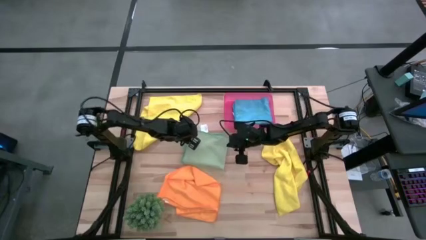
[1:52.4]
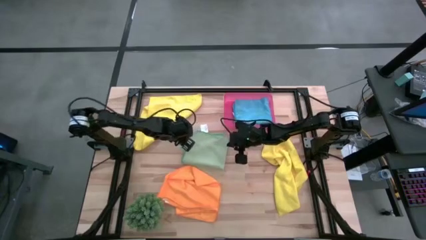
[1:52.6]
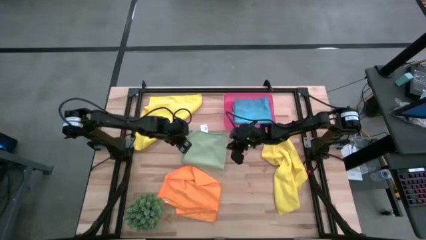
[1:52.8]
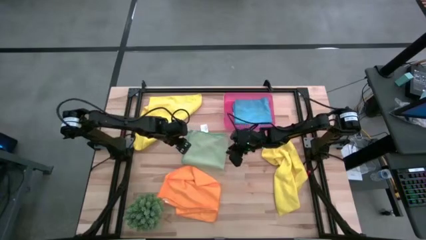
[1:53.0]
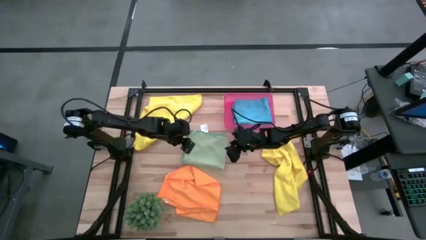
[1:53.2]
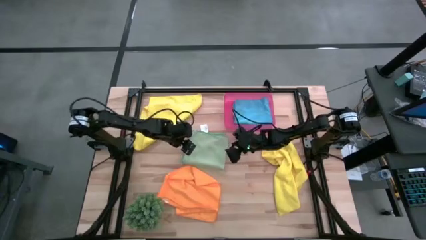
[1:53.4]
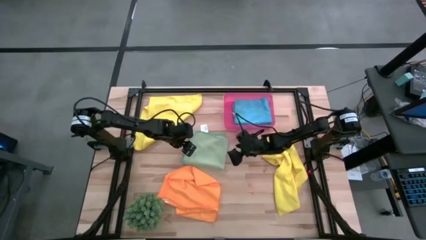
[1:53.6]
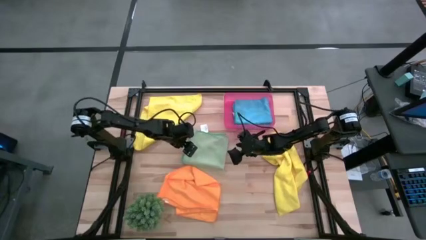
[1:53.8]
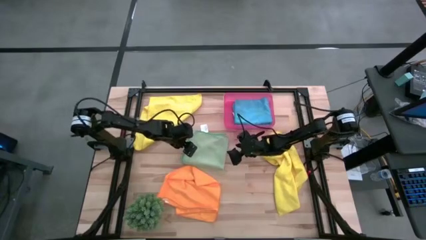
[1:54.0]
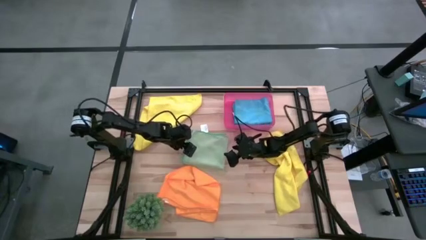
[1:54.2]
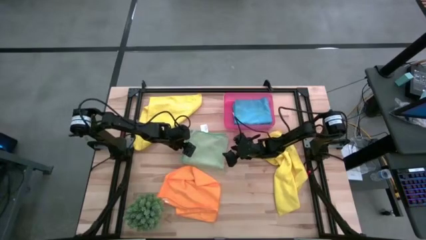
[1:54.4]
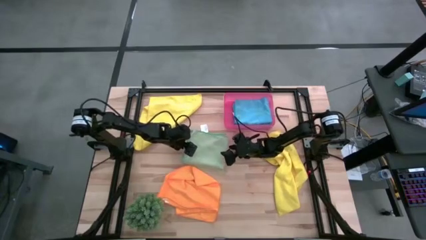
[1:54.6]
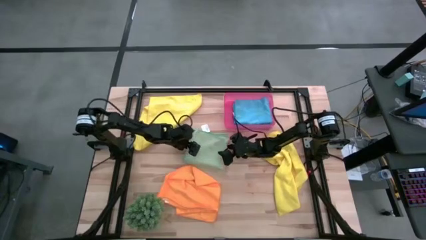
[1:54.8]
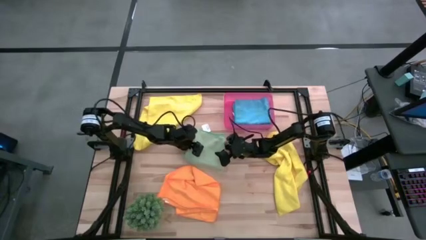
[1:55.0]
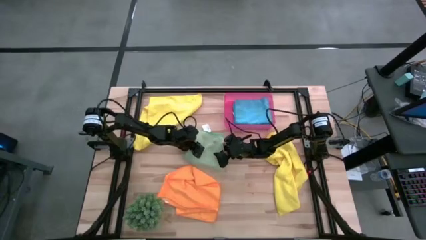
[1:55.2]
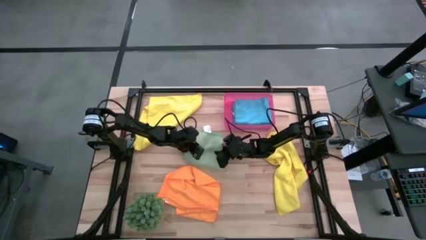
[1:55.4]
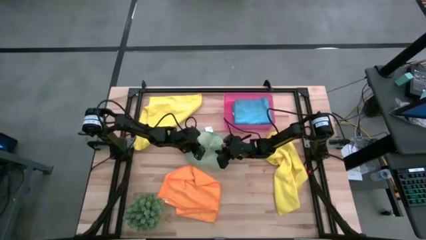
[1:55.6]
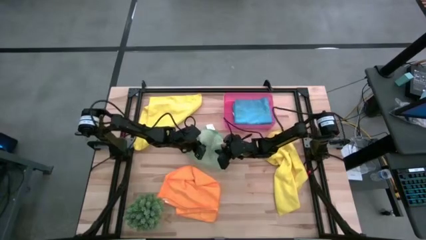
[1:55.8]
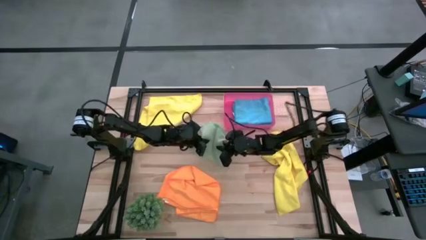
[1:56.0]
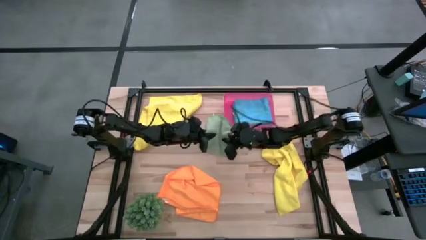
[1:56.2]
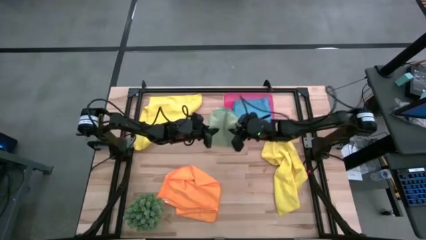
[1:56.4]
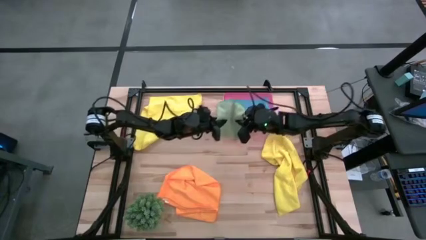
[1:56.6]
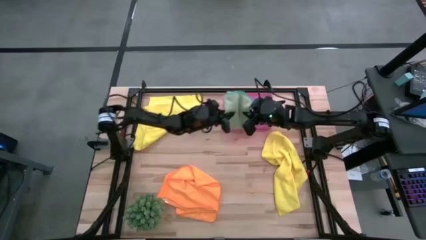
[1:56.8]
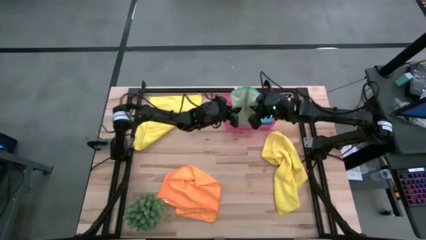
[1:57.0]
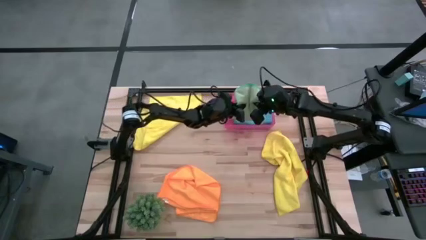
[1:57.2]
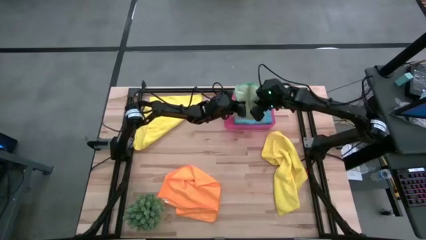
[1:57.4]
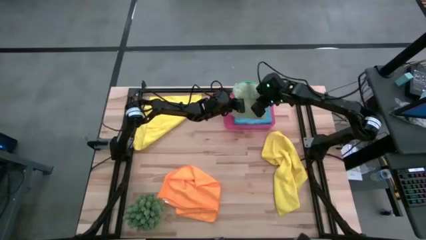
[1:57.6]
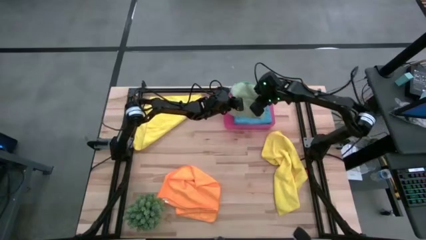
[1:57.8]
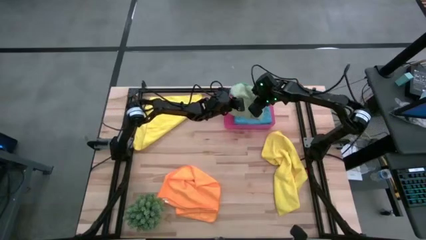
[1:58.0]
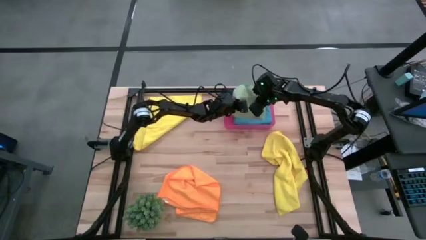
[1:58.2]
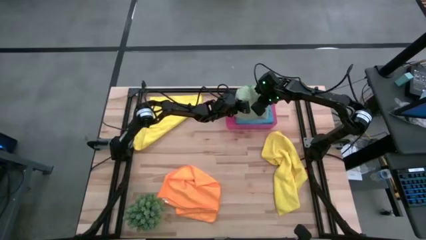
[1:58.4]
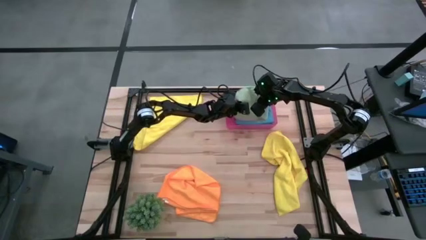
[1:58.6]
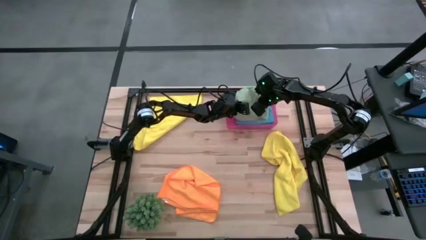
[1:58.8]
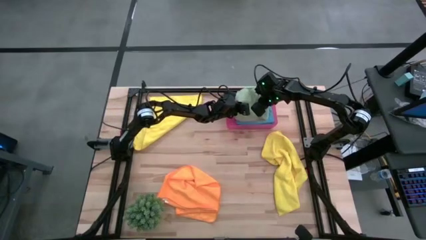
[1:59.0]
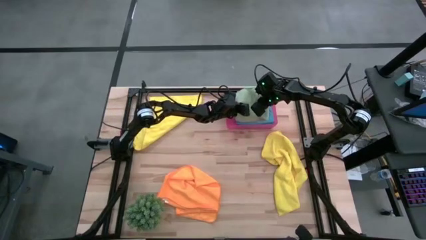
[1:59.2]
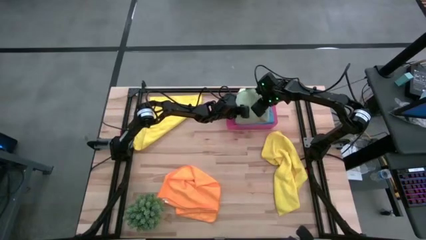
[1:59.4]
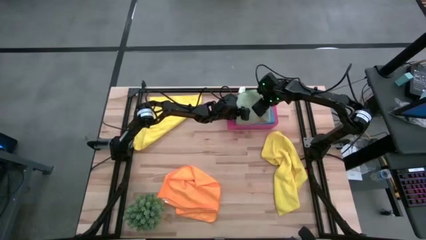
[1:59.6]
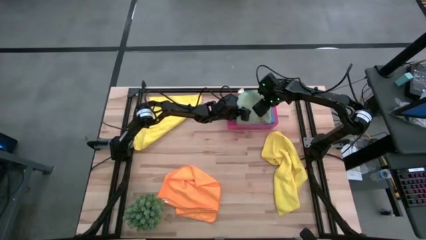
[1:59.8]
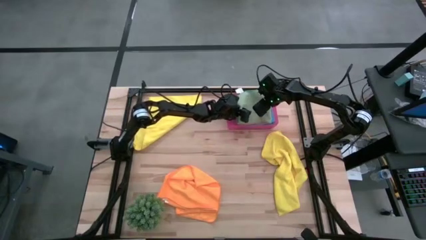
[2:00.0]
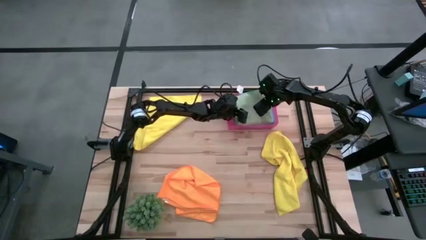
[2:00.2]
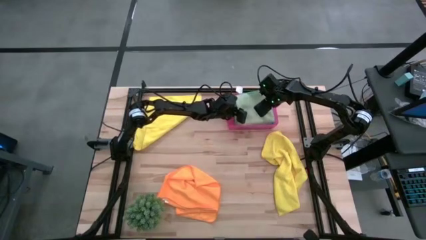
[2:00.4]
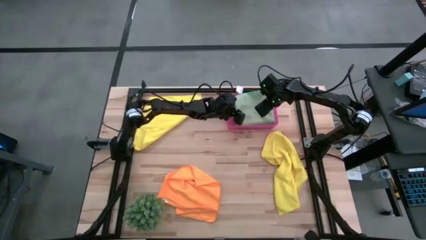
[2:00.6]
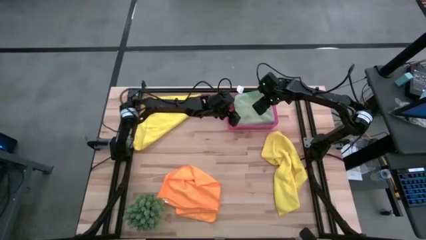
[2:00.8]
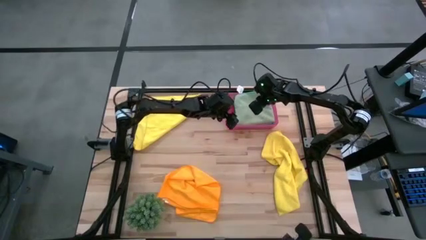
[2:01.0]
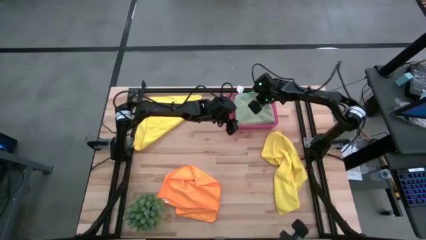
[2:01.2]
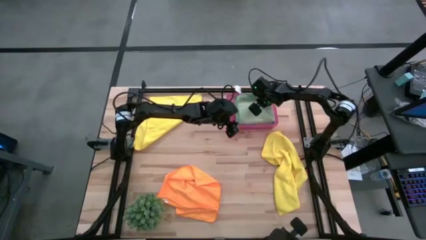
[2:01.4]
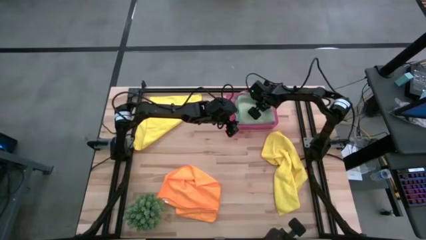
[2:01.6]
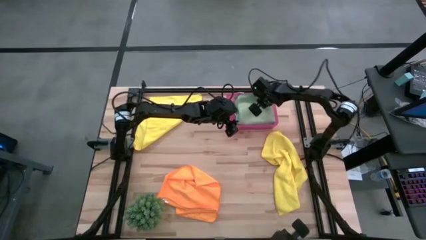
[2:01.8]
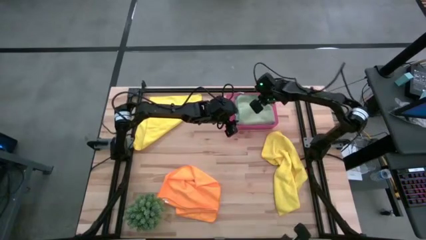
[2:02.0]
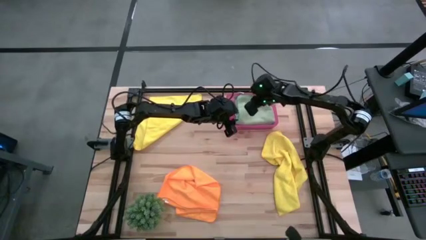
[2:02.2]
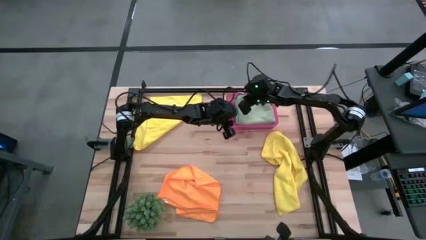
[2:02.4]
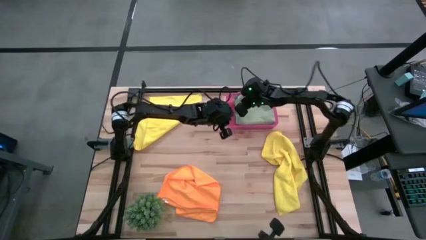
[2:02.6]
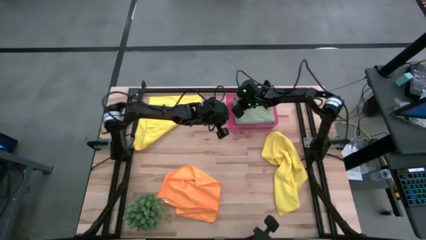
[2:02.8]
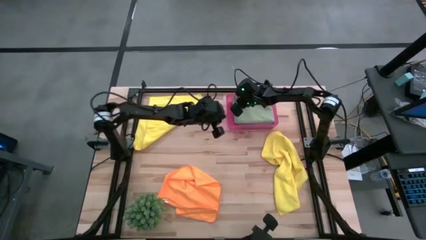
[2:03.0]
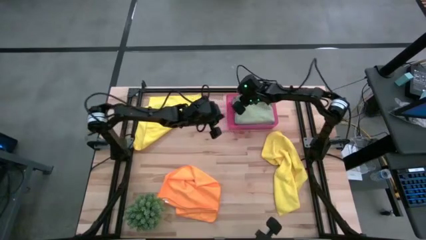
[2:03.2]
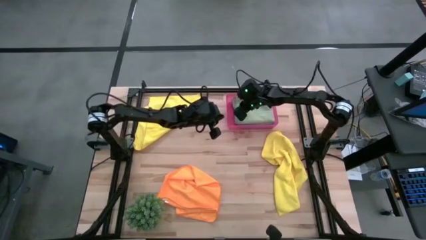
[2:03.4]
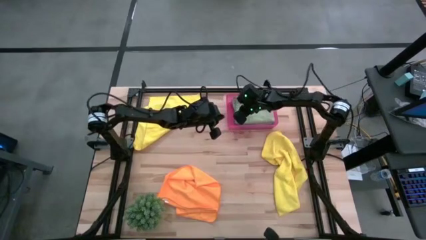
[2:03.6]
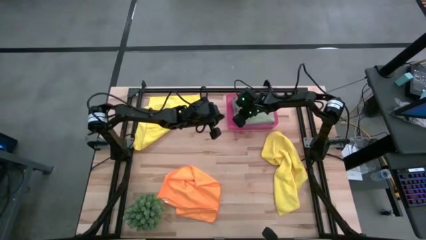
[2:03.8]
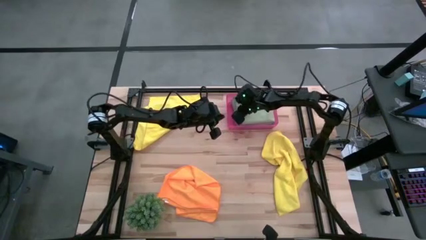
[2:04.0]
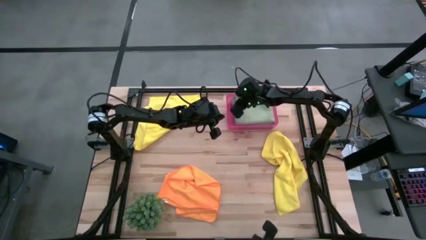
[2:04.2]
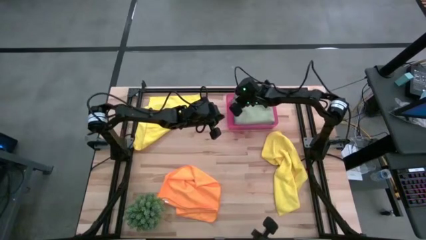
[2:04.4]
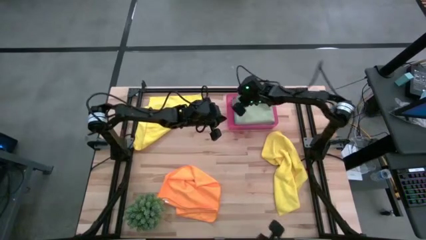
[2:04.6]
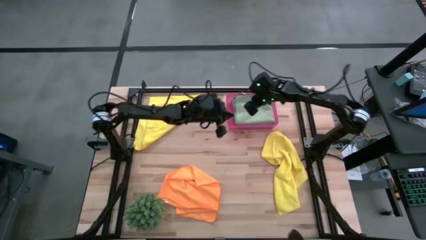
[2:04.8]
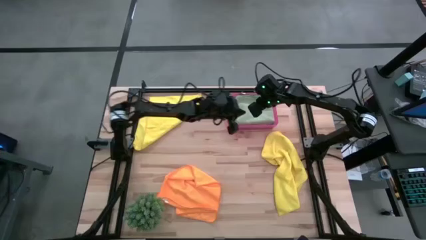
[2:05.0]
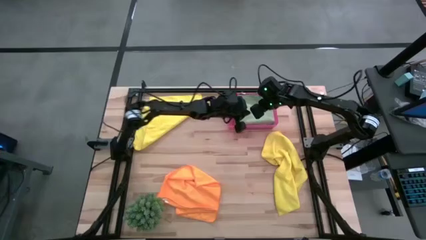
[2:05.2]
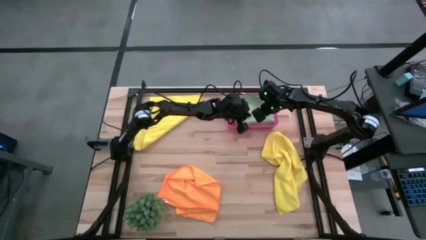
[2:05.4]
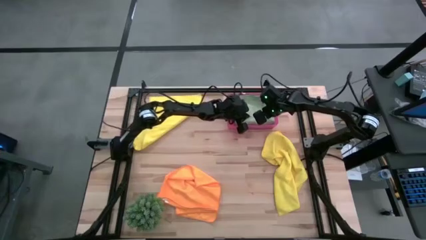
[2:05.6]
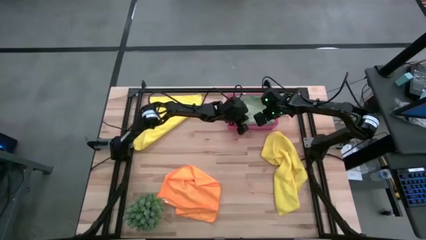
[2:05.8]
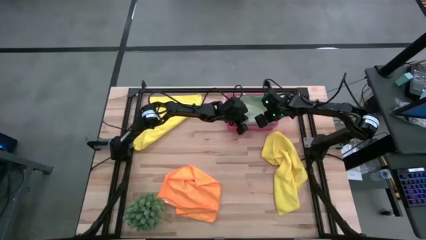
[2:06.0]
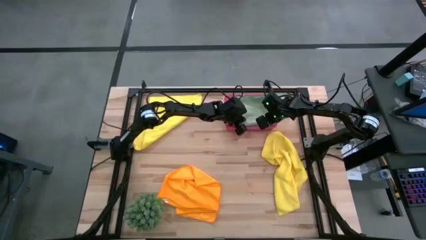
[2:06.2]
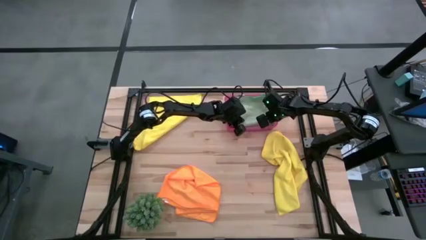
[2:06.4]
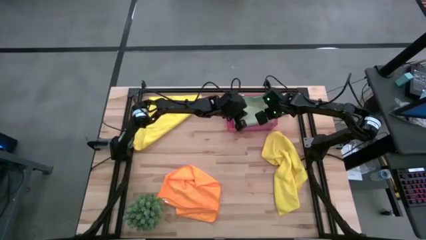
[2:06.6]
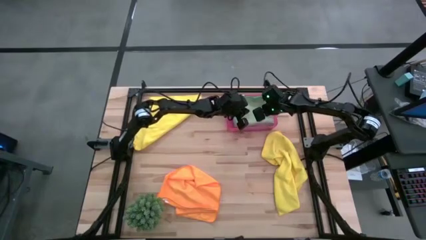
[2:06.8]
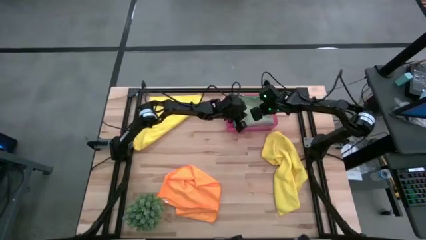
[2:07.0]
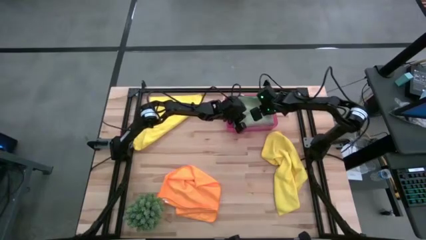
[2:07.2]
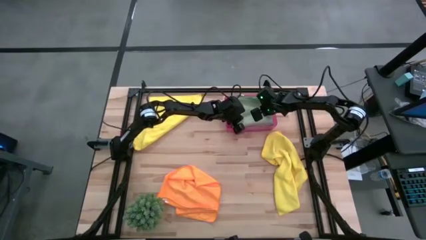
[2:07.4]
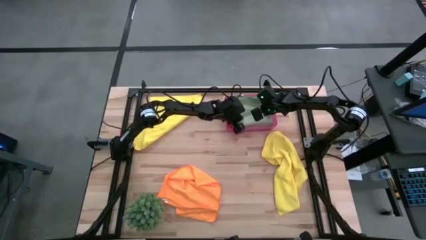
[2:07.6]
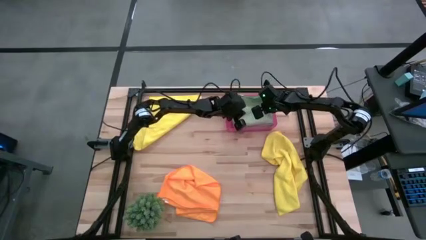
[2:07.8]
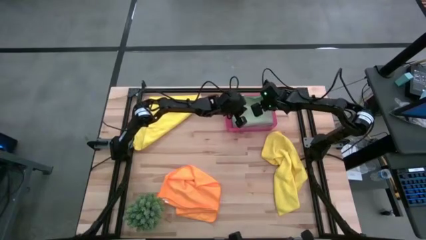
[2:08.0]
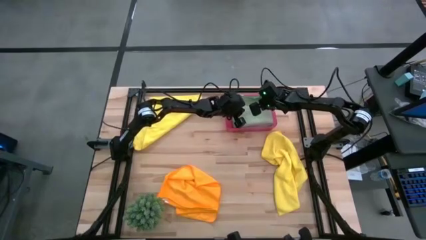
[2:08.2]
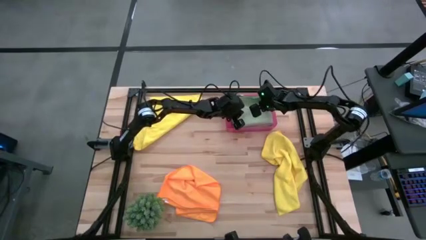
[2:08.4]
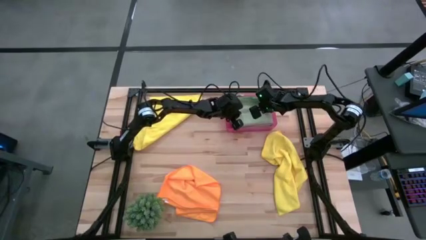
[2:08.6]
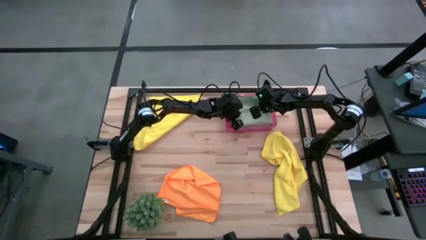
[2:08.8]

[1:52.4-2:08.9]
Task: Fold microfiber towels
Put the folded green microfiber cloth into the red bin
